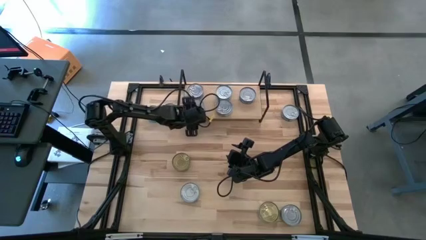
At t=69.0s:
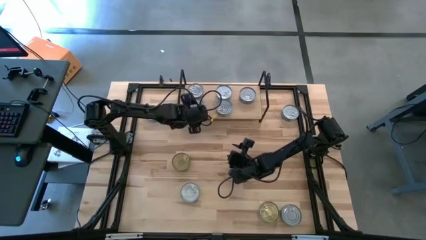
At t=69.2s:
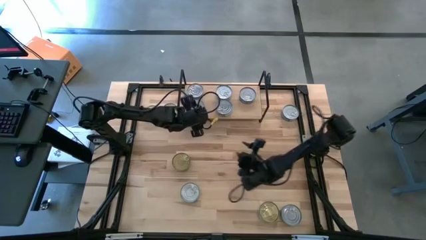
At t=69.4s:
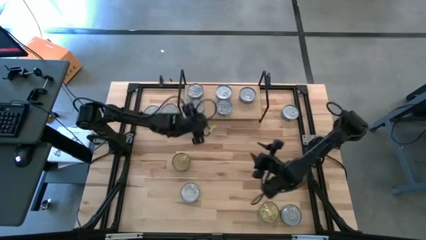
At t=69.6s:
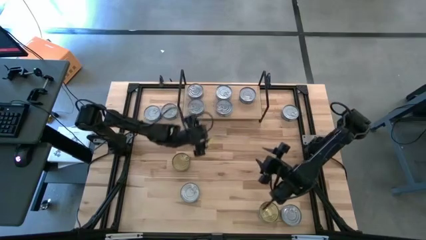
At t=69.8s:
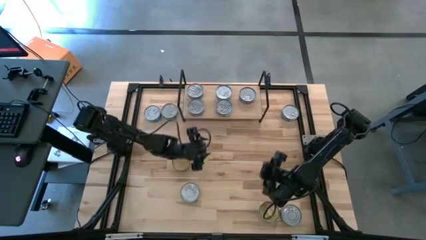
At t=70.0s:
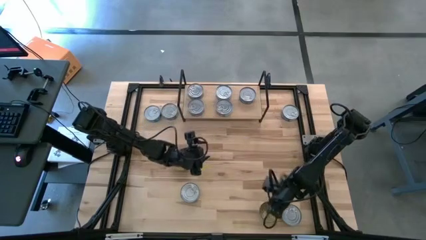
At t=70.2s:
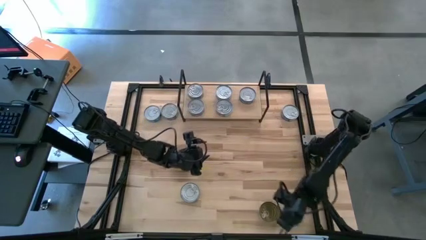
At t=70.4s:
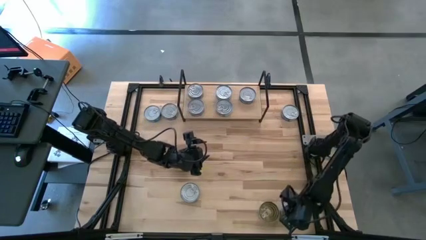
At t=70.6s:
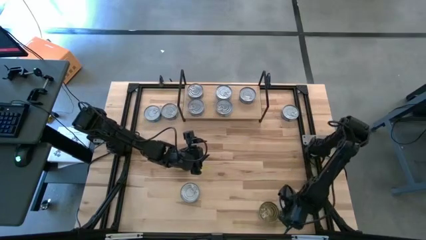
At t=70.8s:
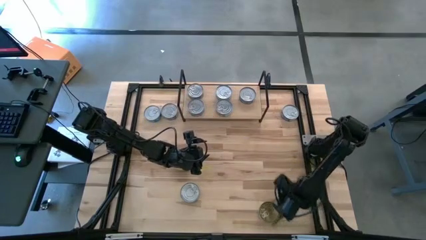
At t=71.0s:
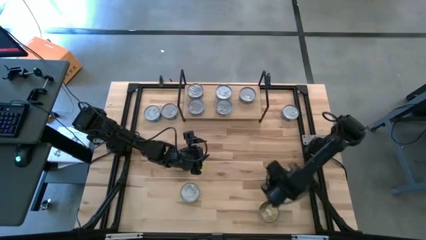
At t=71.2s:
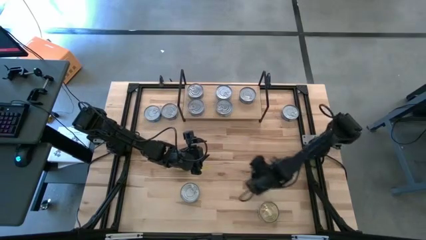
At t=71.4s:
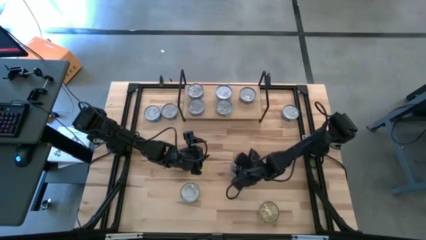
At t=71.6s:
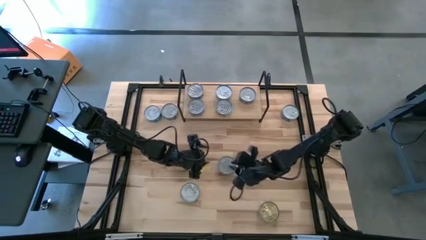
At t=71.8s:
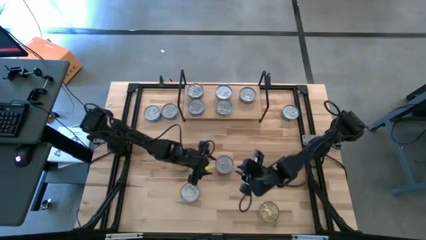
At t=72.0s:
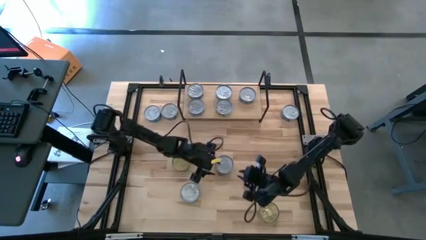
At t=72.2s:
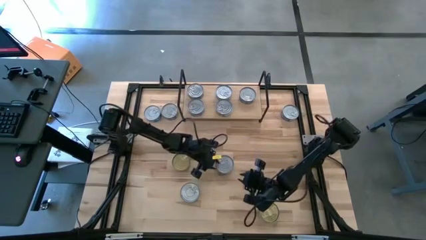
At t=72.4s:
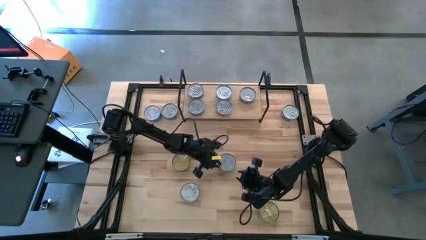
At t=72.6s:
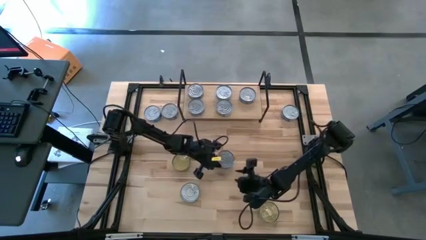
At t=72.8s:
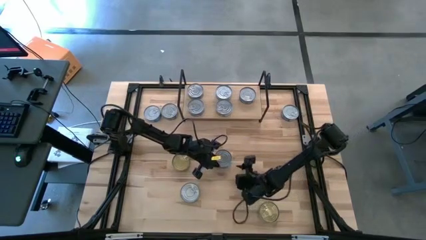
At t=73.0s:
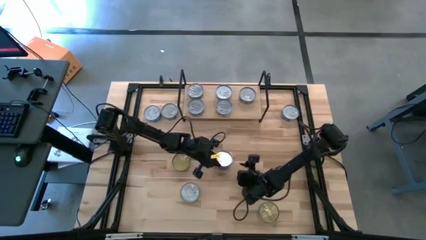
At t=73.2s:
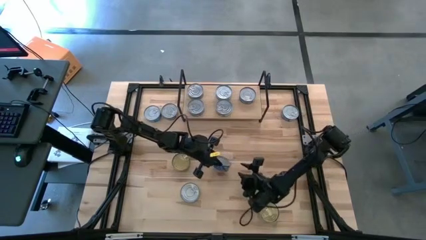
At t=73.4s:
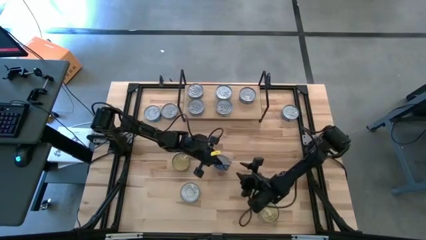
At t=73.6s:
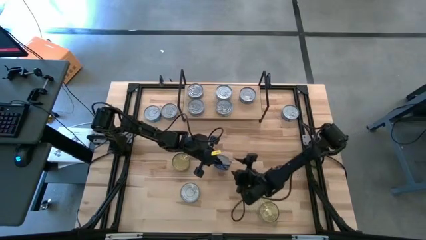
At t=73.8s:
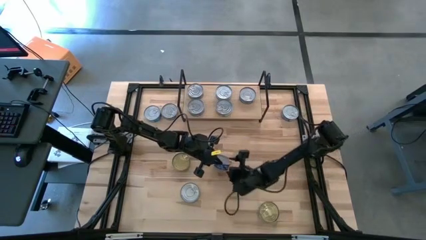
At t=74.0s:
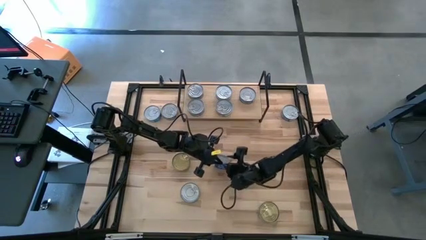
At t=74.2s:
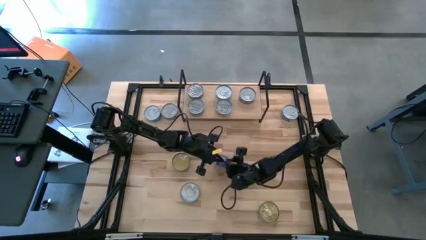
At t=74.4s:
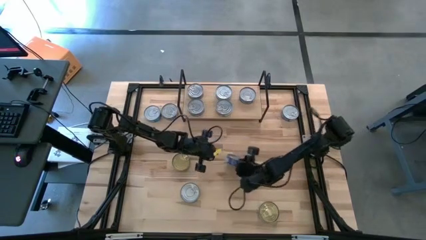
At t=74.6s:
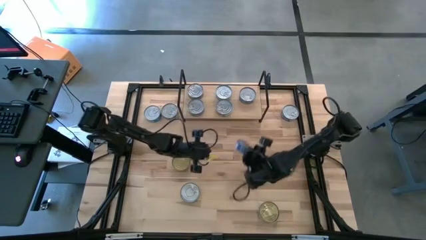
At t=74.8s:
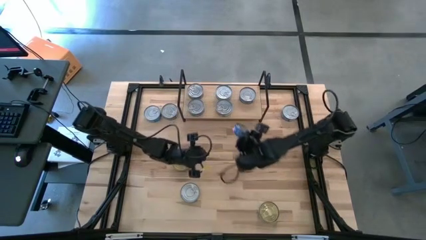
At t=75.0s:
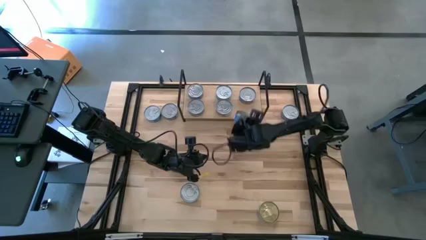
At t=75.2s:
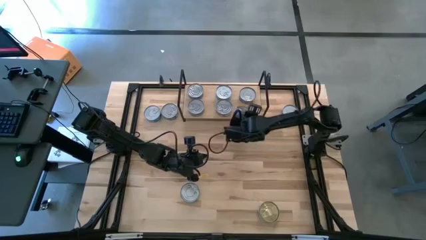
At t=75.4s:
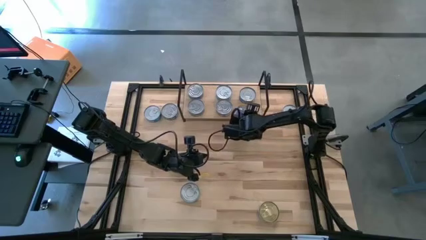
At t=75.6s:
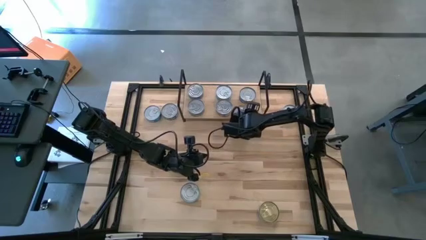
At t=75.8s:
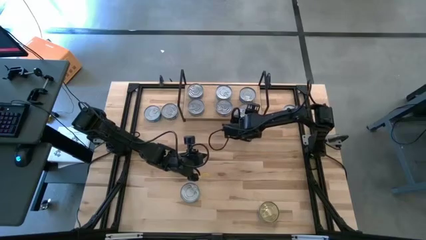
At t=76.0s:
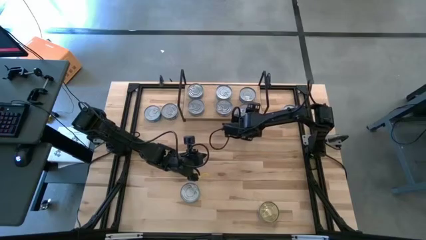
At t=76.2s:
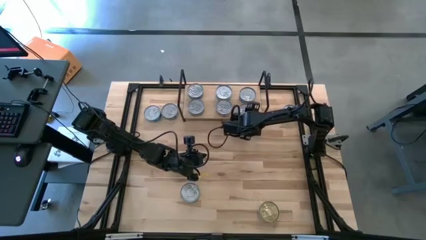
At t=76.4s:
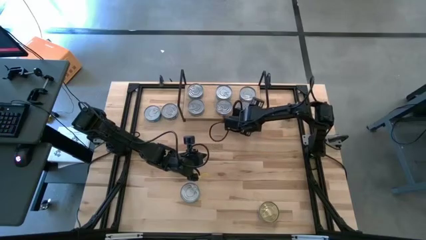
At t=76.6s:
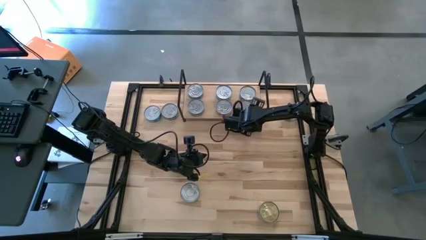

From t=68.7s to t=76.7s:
Task: Stack canned seafood by type on shelf
Put the blue tuna can on the shelf

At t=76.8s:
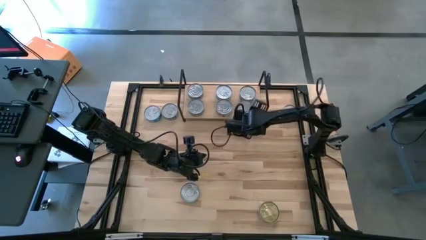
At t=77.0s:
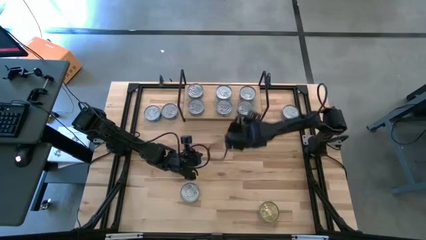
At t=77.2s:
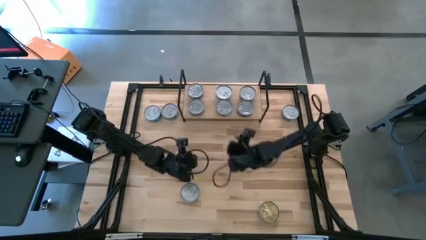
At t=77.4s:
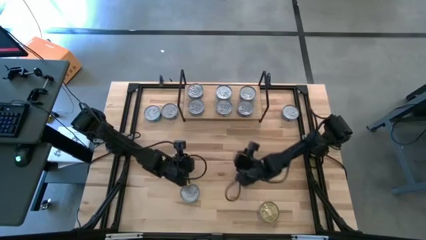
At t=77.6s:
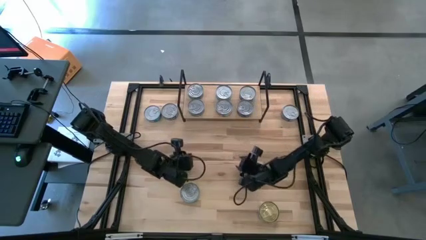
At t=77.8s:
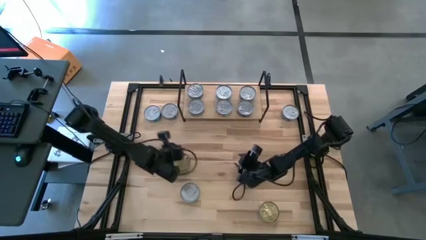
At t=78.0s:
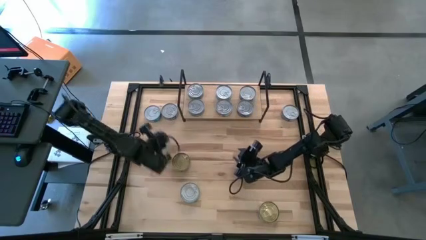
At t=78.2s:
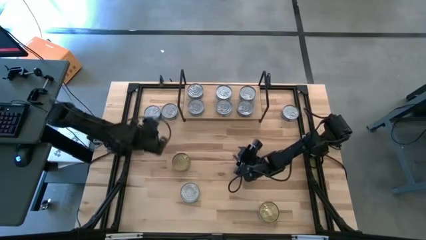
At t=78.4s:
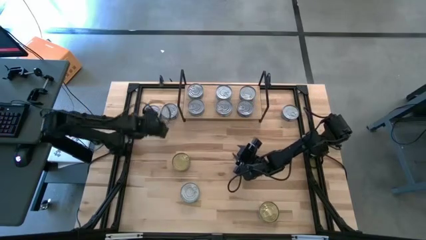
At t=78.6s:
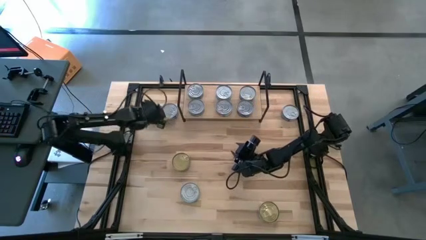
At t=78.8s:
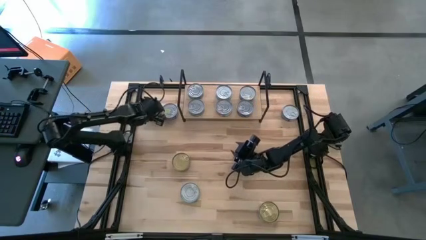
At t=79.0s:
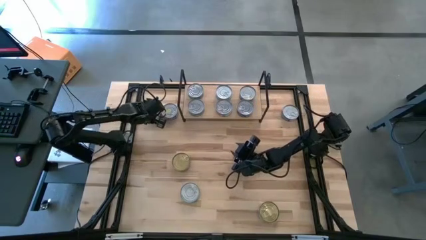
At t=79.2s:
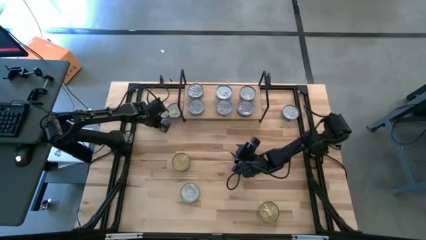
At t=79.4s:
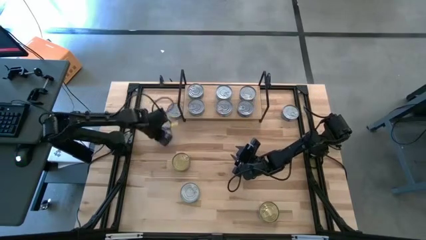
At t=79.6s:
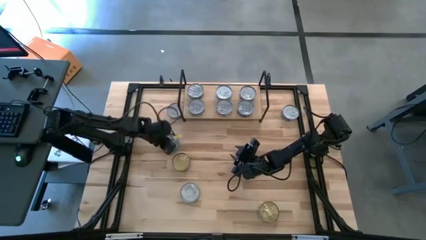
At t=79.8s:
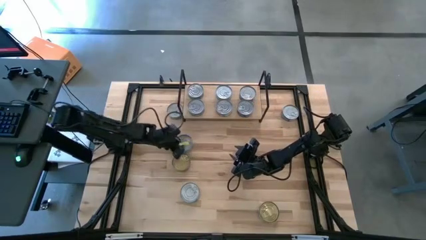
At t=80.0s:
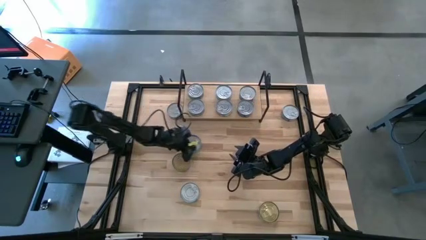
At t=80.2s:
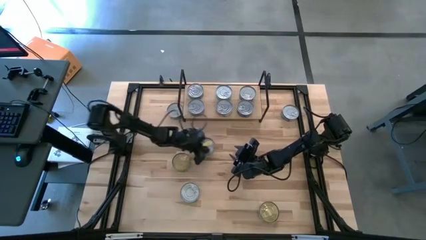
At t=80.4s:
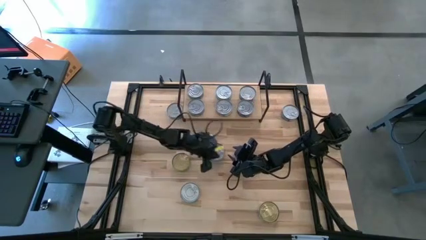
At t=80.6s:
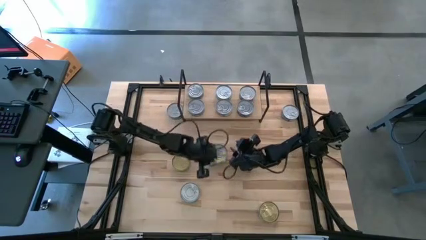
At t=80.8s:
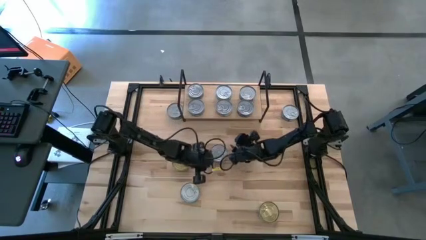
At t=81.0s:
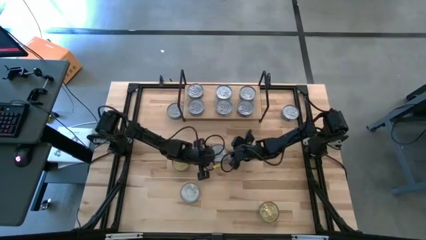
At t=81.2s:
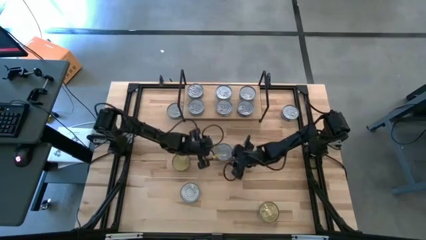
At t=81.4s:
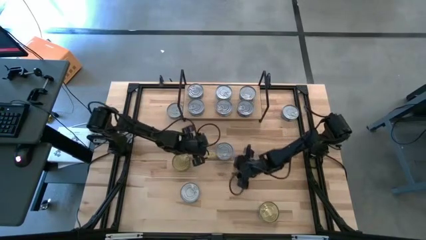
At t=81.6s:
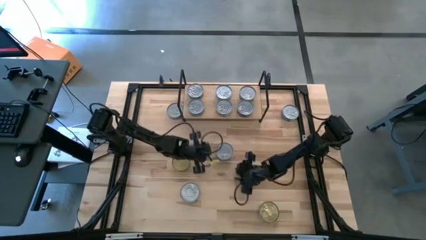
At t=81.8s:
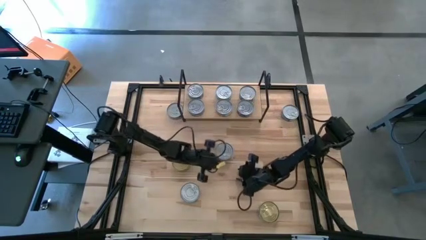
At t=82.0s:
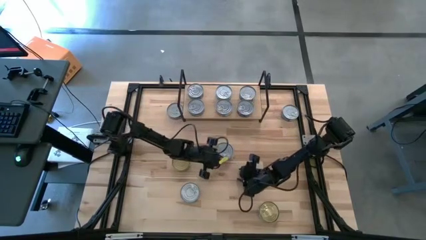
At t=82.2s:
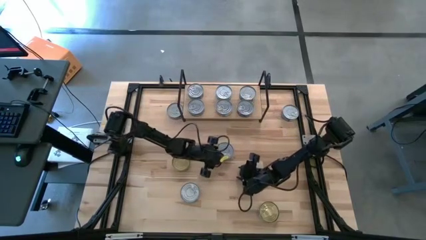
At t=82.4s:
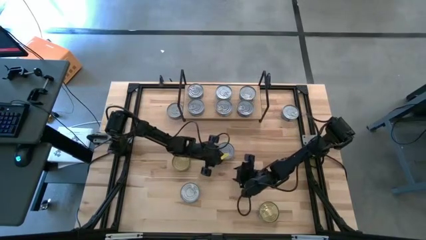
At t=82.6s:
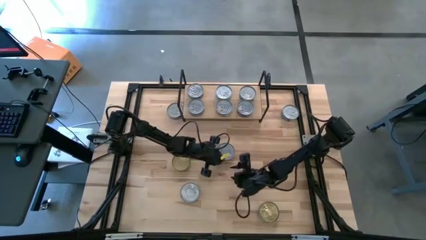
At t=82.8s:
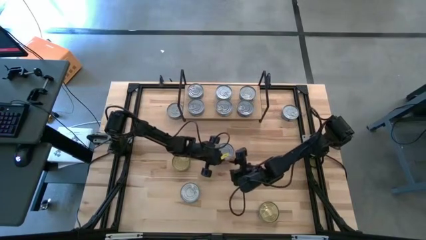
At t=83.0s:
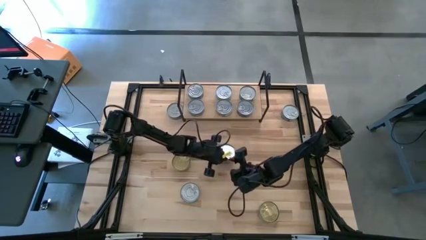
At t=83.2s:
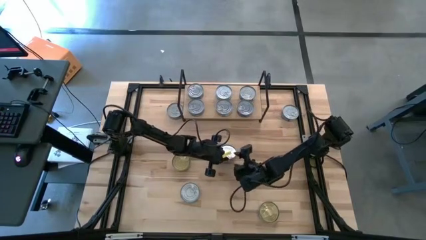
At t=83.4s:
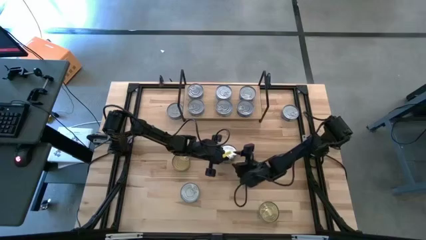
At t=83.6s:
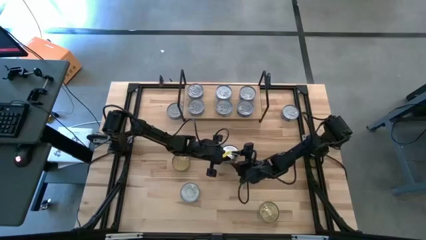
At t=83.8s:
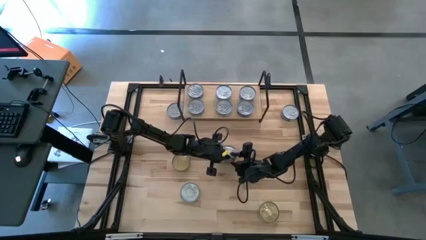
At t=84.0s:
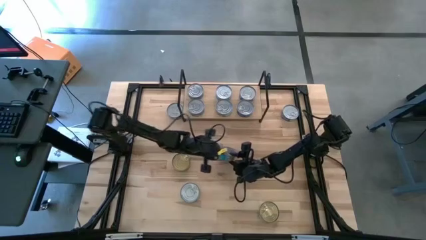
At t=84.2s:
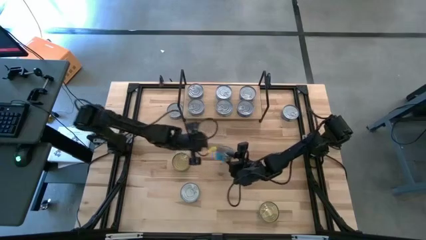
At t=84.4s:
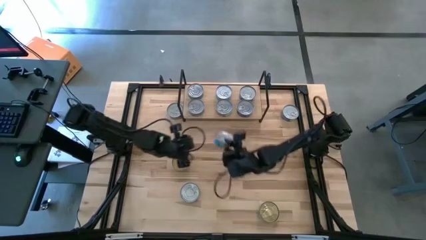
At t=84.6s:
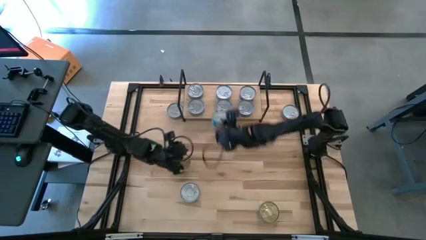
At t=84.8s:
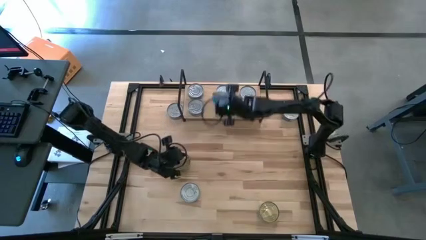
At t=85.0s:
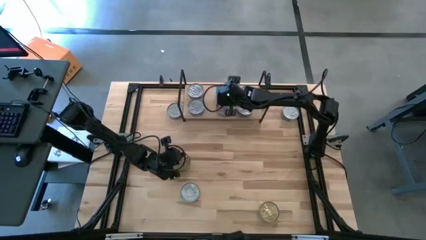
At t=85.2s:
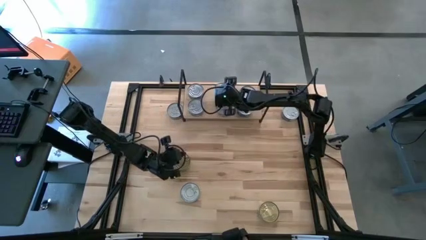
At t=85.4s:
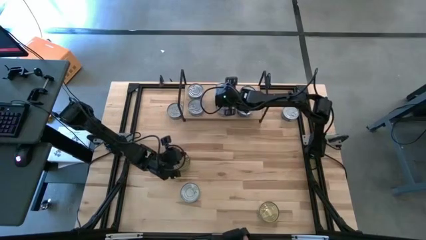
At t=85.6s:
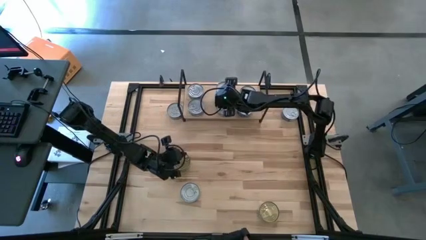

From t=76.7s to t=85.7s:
Stack the yellow and blue tuna can on top of the other yellow and blue tuna can on the shelf
